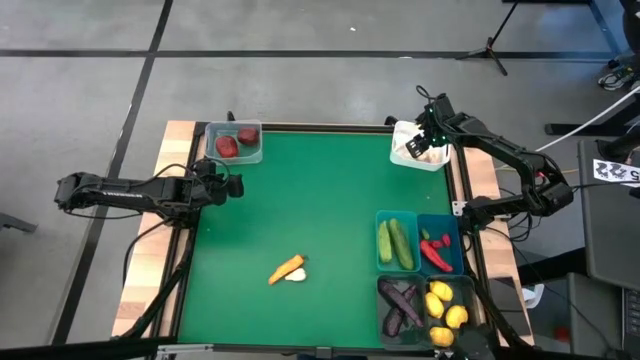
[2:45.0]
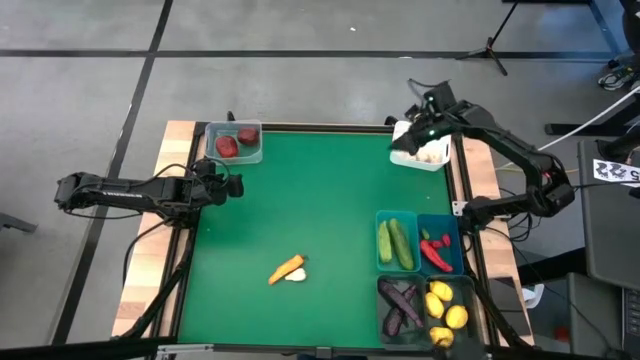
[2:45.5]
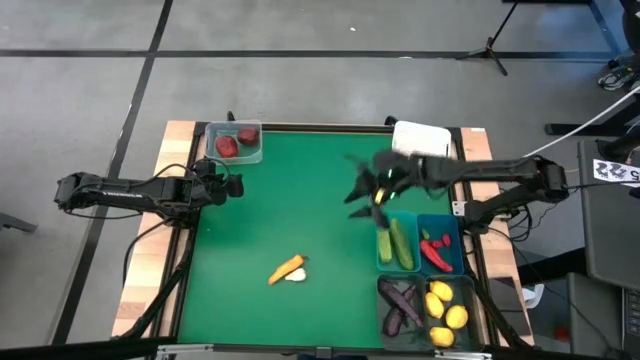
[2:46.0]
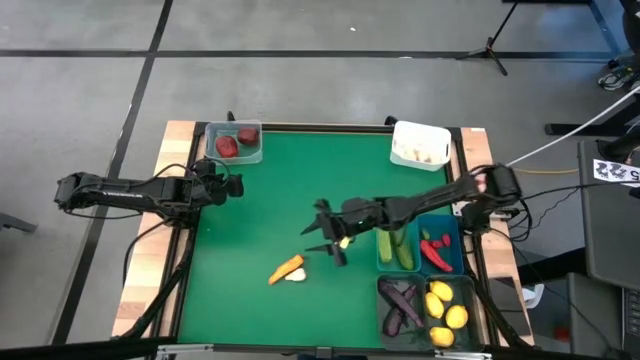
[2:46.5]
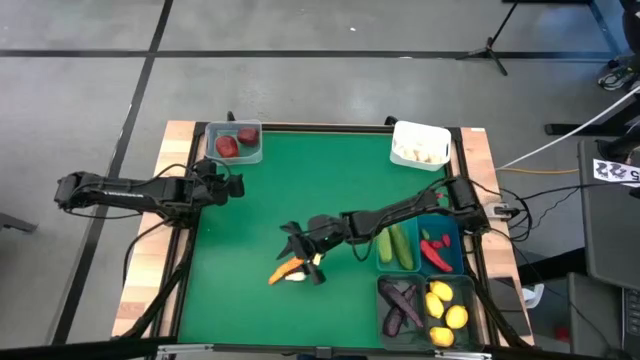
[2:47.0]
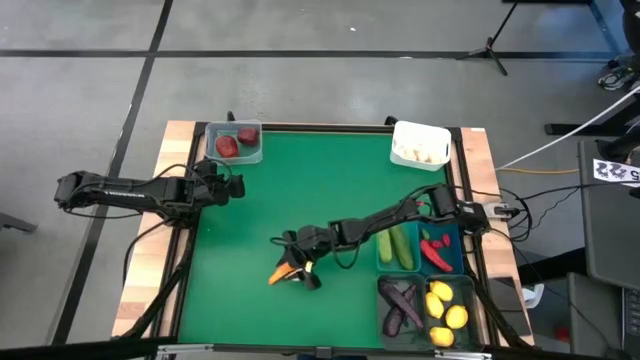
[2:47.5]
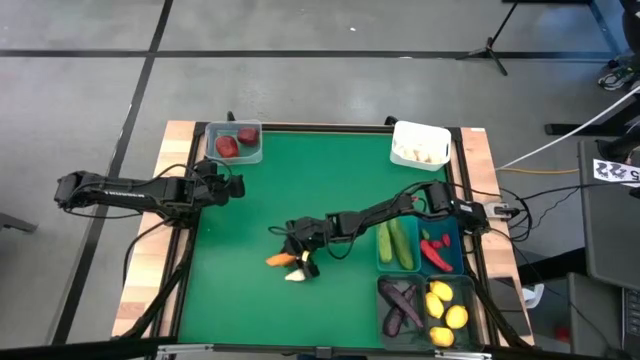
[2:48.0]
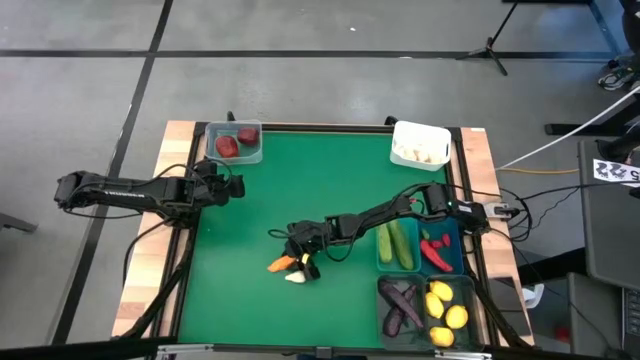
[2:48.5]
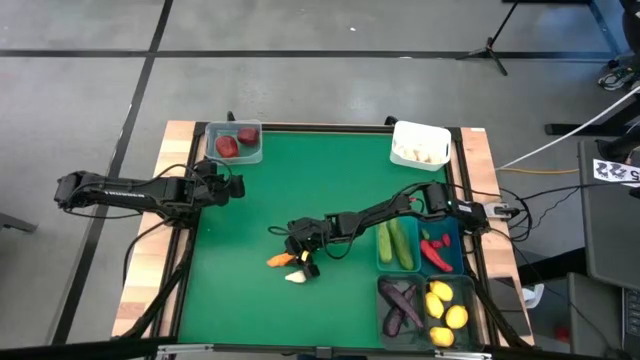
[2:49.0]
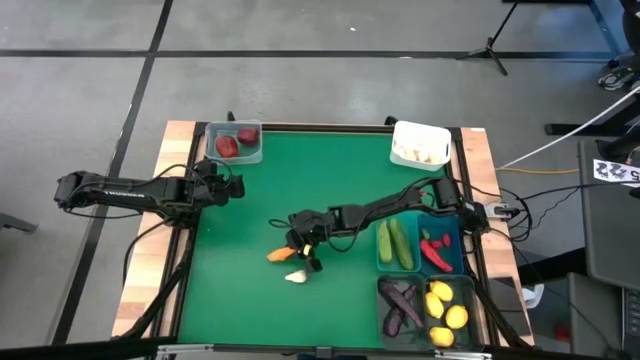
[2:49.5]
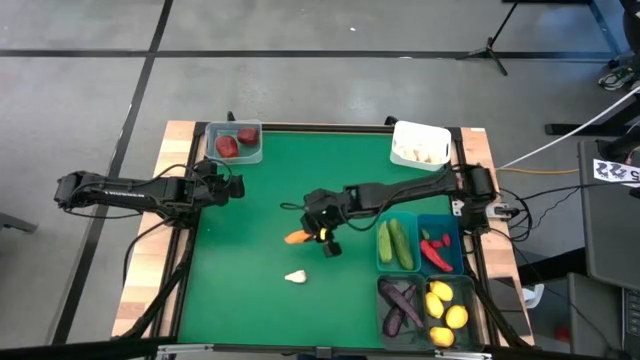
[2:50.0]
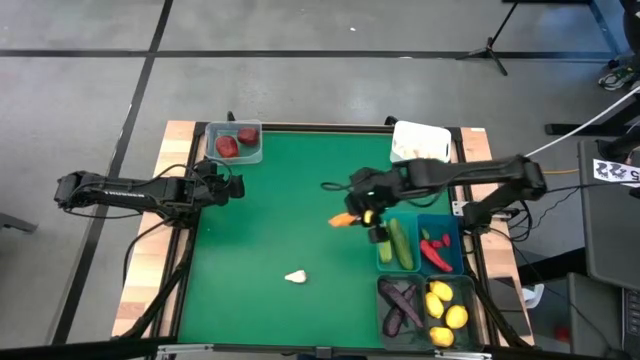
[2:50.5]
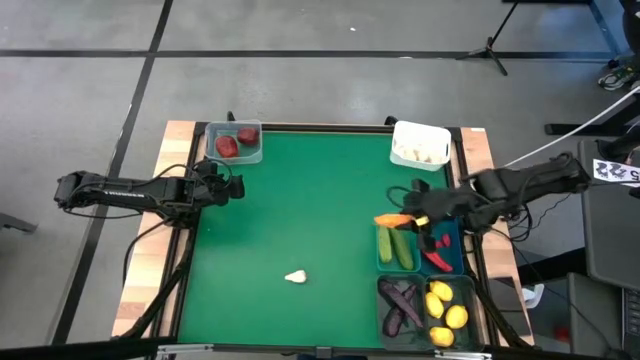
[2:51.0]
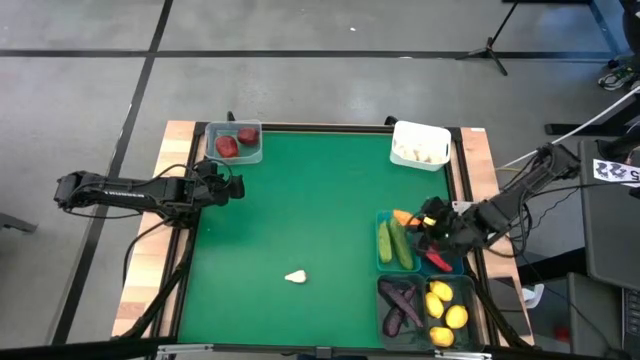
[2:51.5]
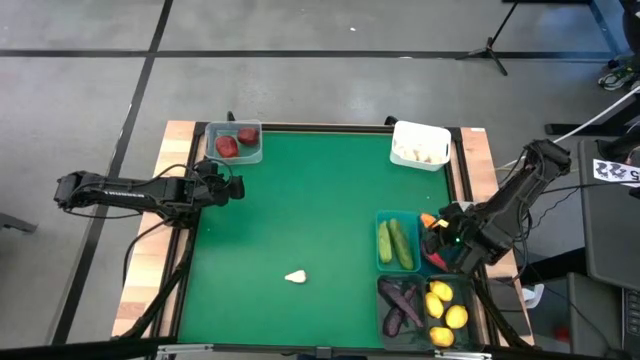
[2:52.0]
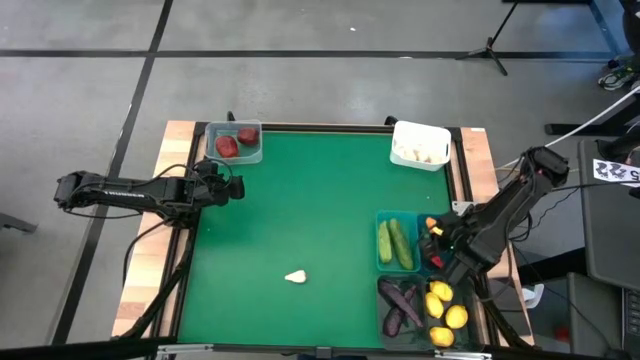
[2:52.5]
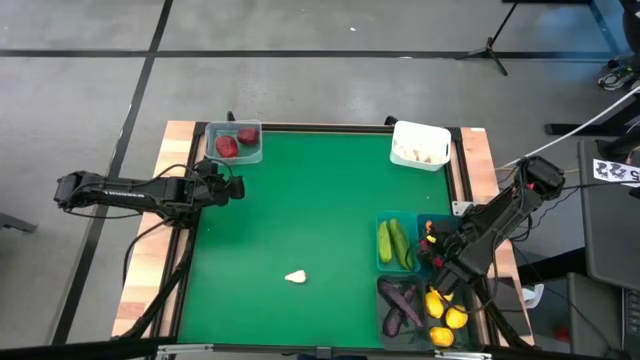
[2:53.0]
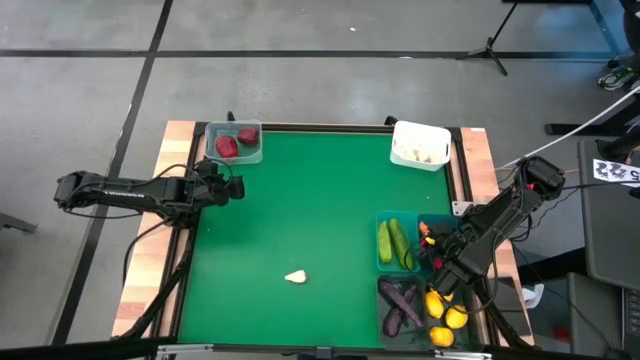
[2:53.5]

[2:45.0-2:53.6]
Task: Sort produce into baskets
Put the orange pepper into the blue bin

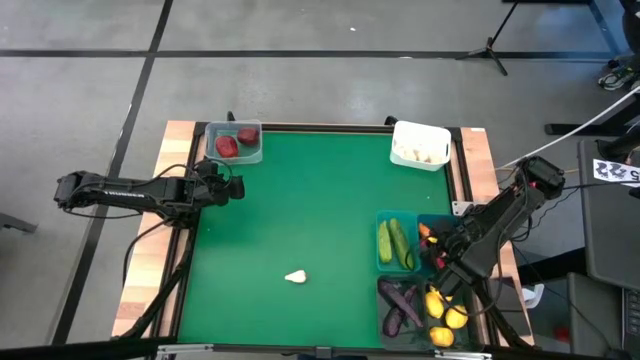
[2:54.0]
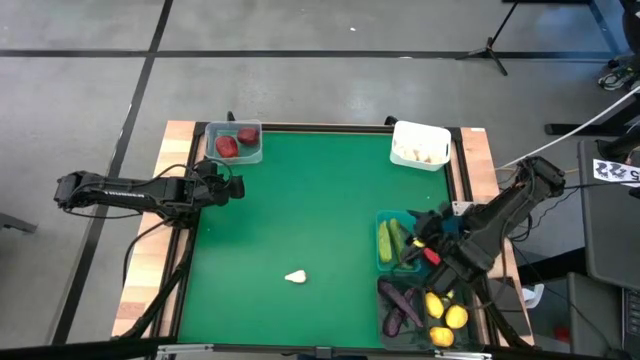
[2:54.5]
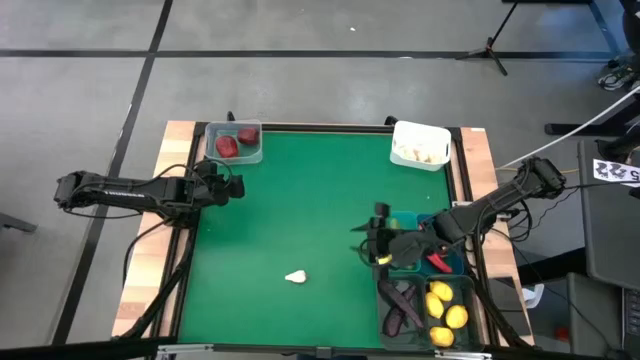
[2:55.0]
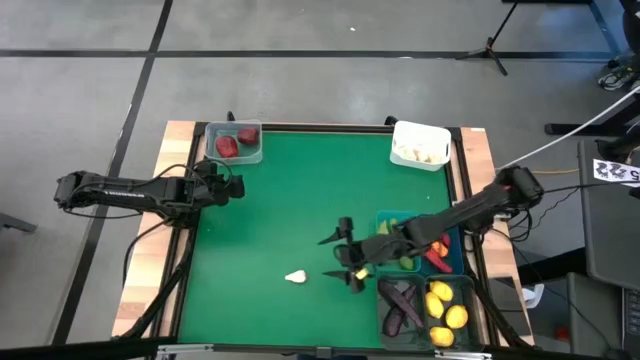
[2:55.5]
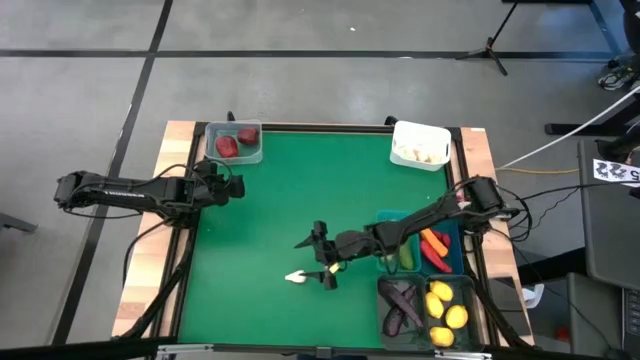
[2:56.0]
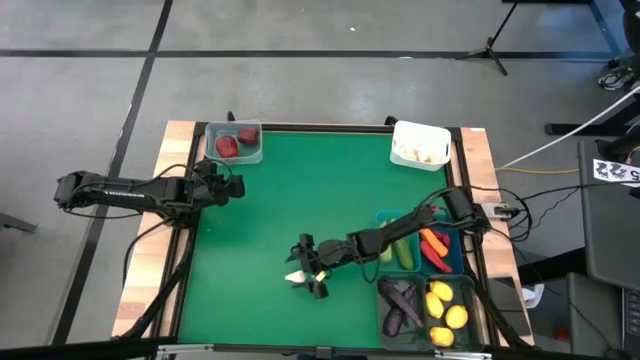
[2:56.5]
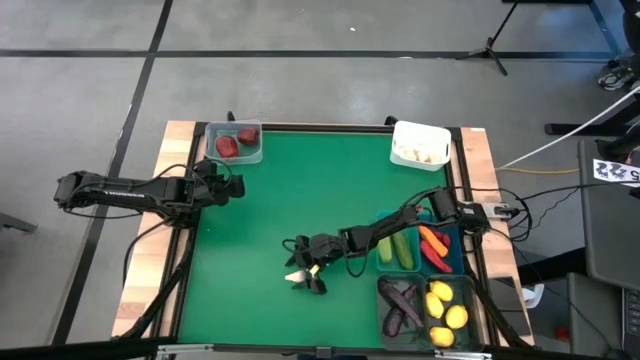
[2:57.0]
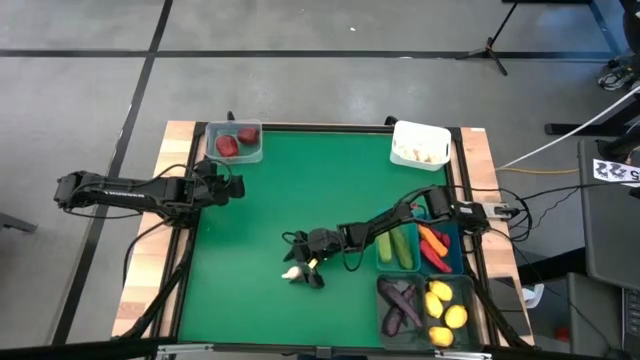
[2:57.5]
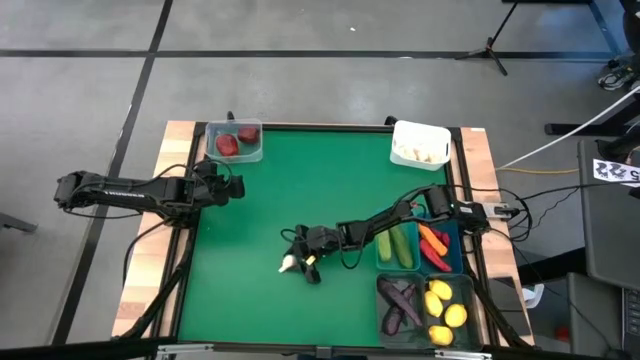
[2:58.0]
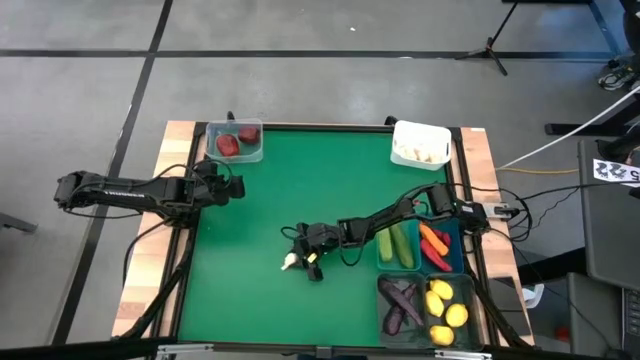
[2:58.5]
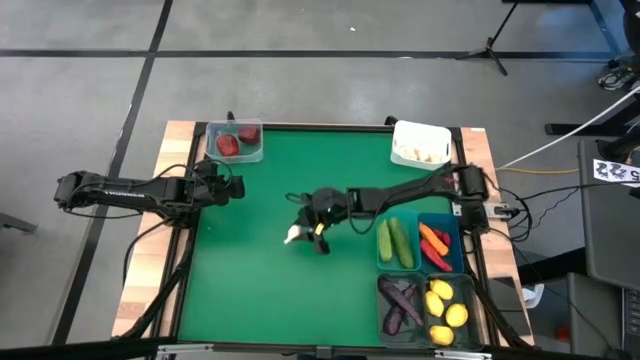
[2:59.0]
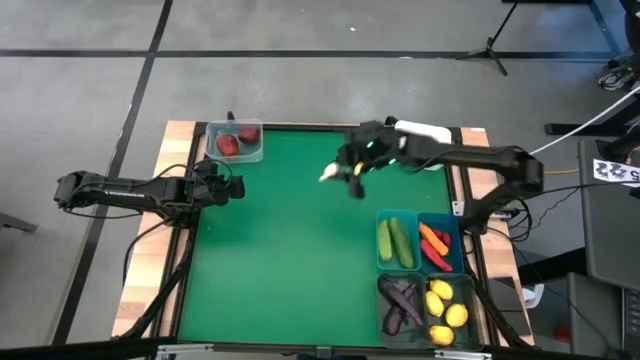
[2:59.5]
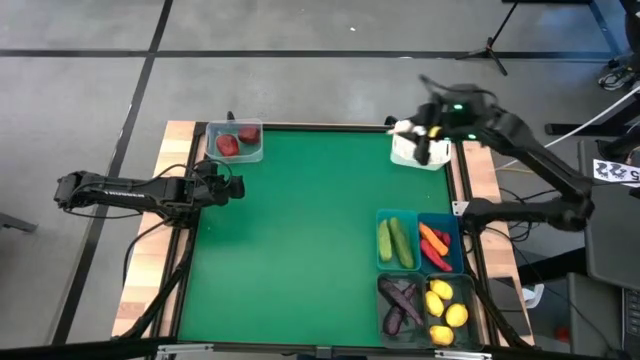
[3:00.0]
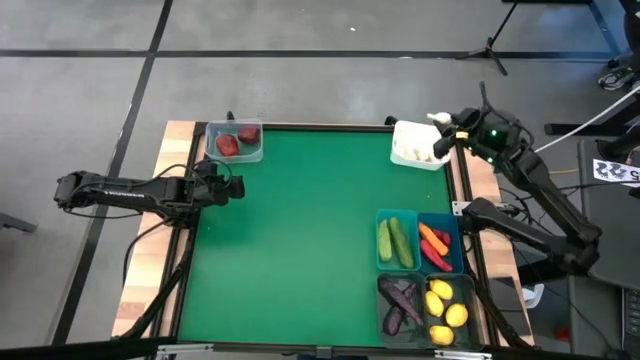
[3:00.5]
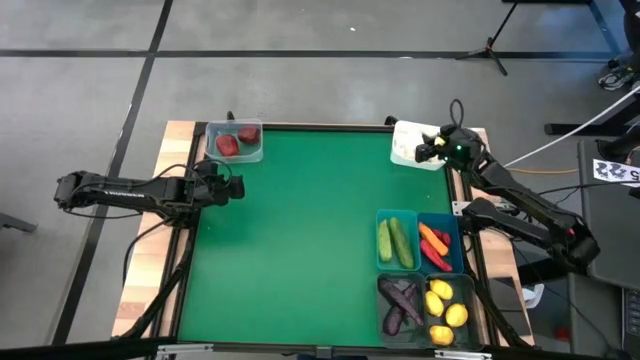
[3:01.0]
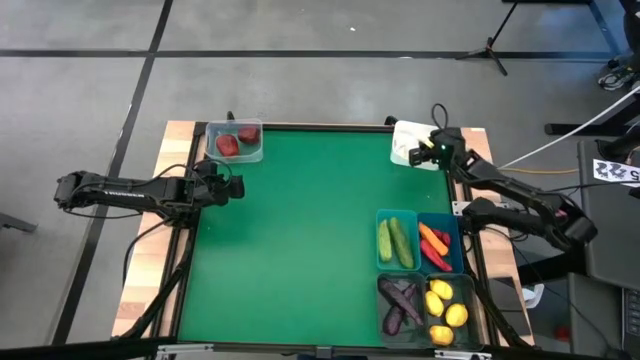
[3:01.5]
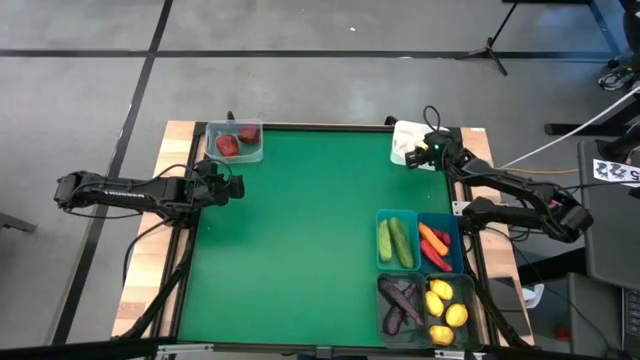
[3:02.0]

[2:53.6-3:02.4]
Put the garlic into the white bin

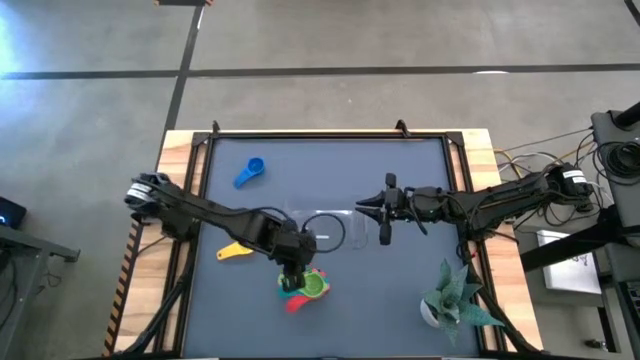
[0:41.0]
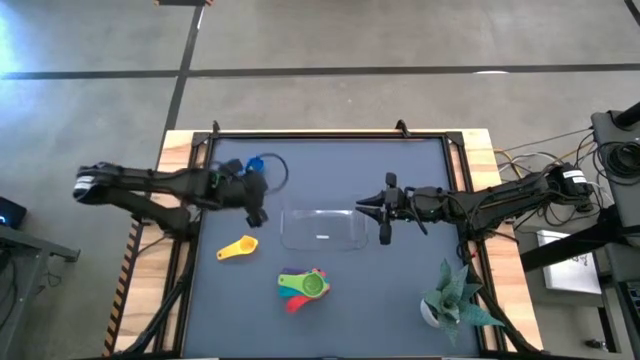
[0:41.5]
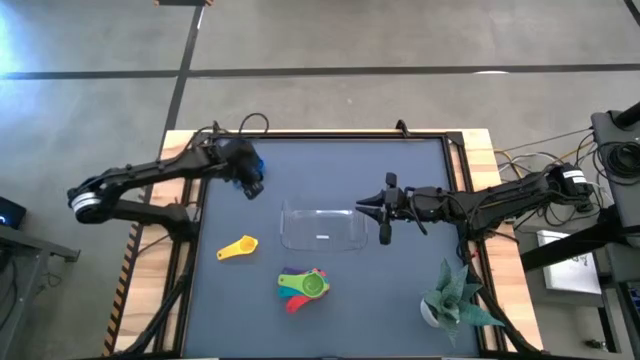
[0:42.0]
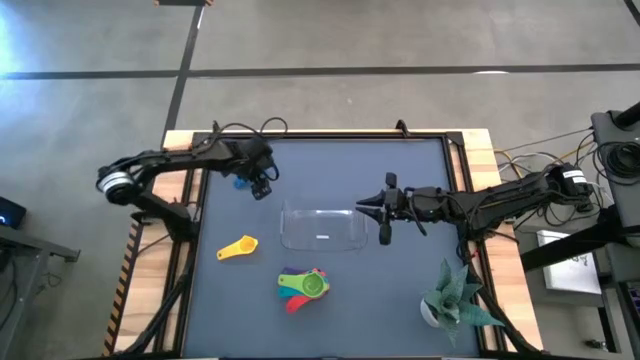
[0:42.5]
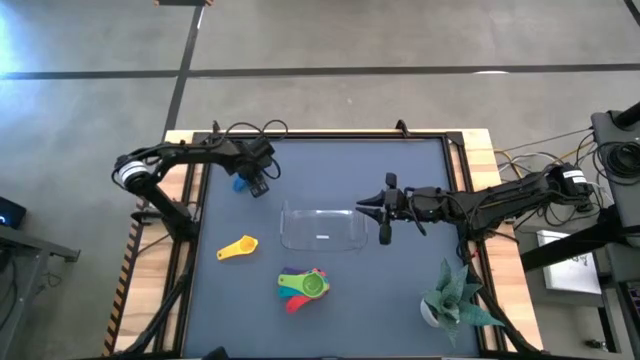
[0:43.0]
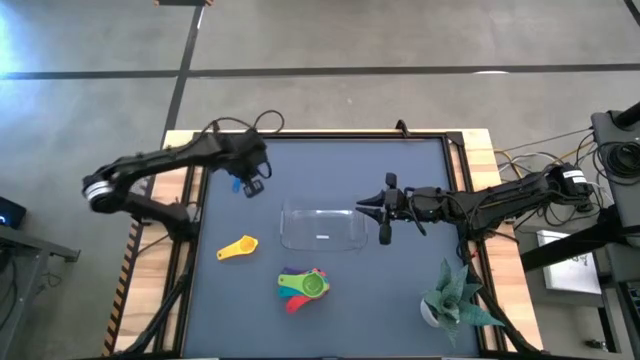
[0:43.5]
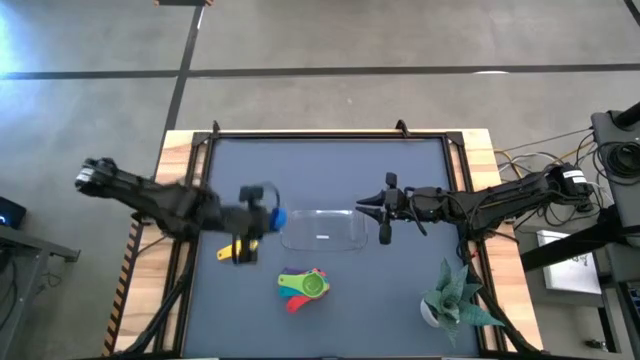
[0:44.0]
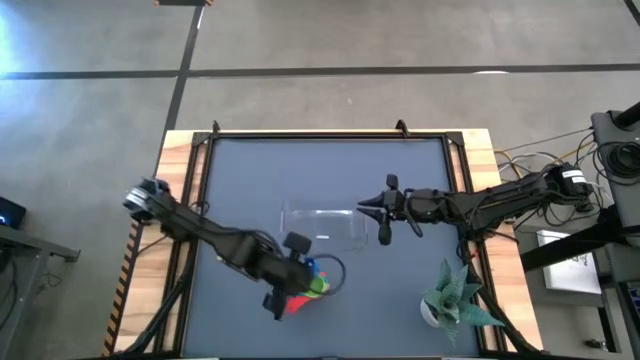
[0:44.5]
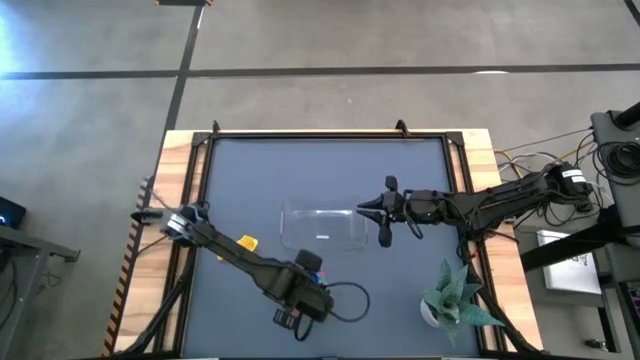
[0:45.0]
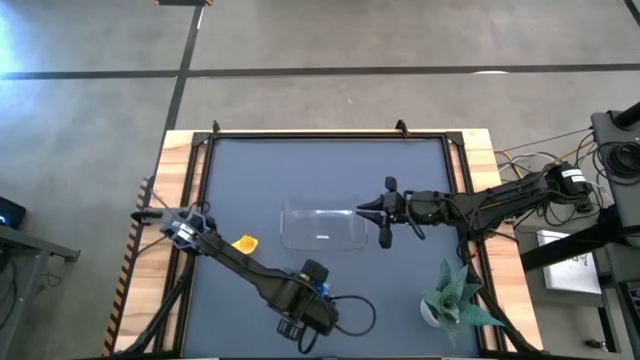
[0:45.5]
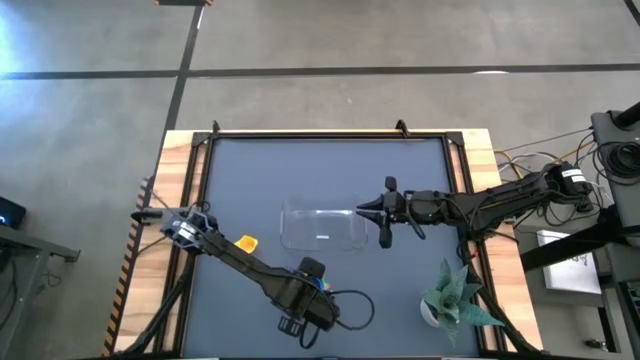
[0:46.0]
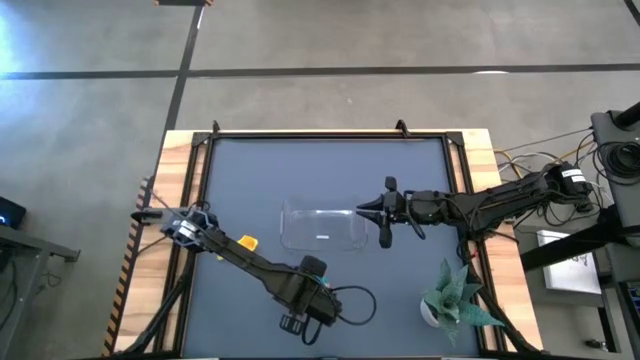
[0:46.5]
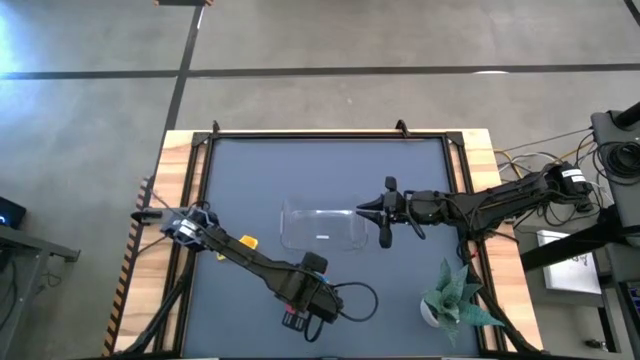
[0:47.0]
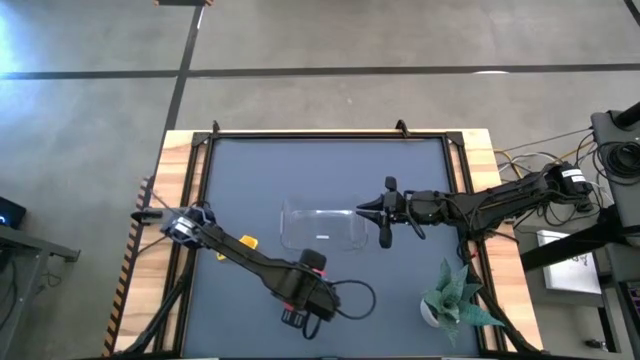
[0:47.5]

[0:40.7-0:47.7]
Task: Nest measuring cups in basket
Stack the blue measuring cup on top of the green measuring cup
